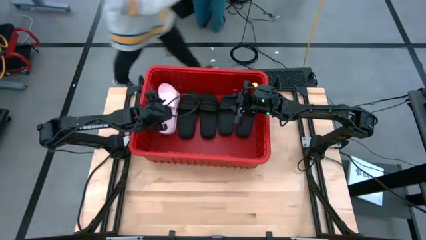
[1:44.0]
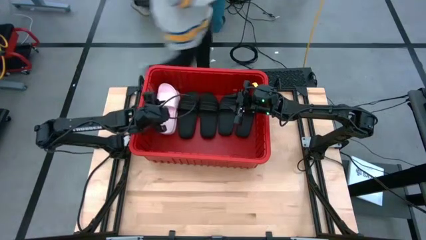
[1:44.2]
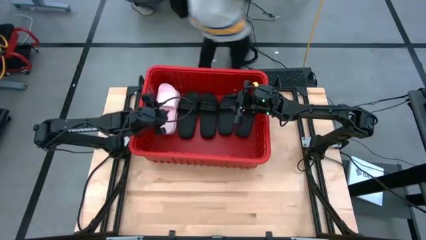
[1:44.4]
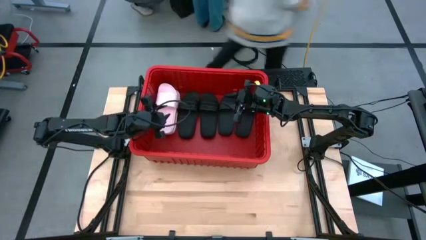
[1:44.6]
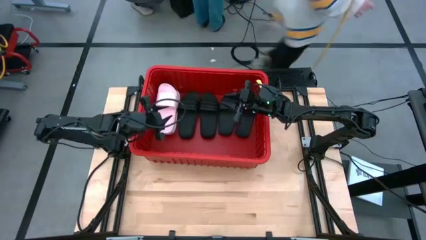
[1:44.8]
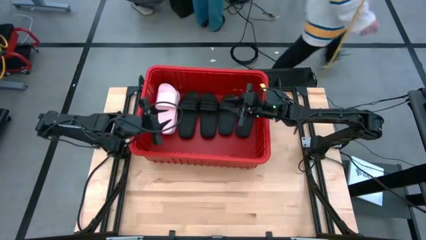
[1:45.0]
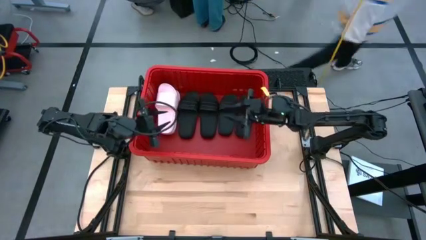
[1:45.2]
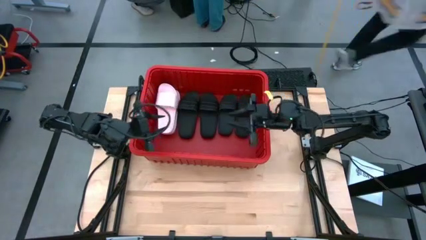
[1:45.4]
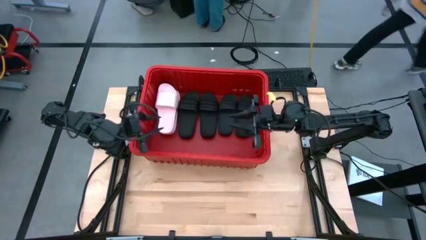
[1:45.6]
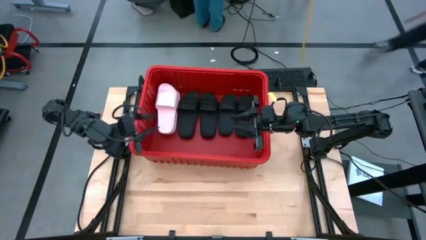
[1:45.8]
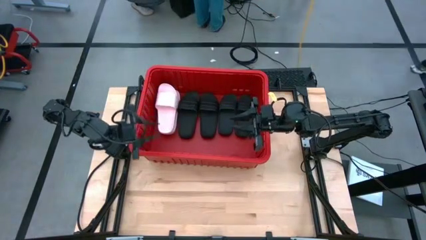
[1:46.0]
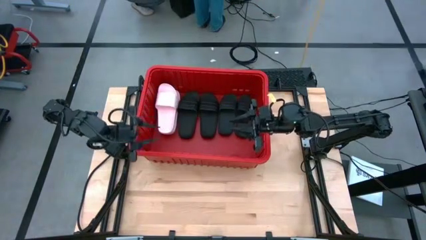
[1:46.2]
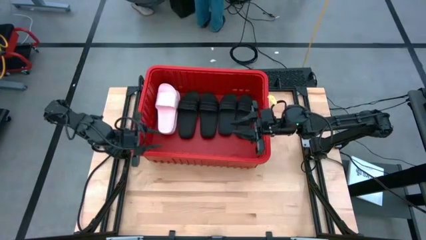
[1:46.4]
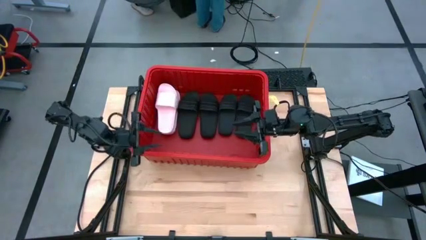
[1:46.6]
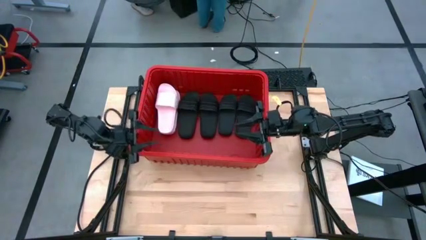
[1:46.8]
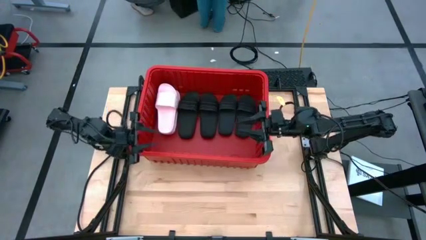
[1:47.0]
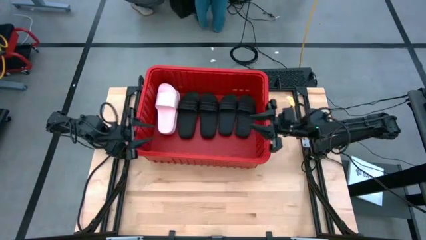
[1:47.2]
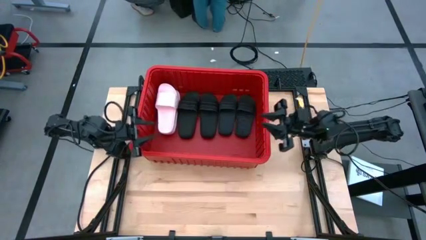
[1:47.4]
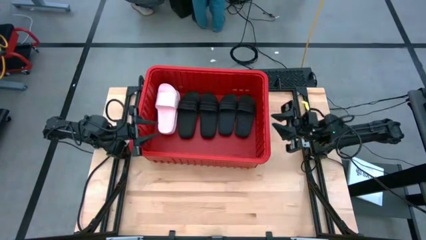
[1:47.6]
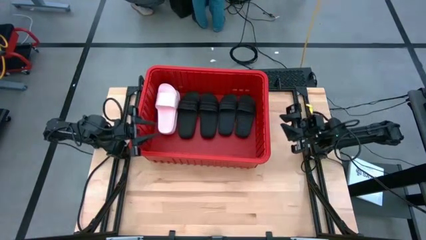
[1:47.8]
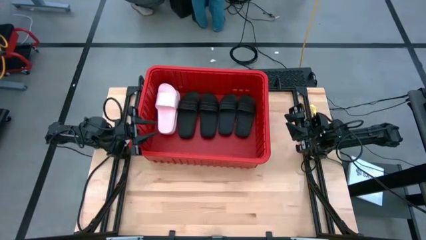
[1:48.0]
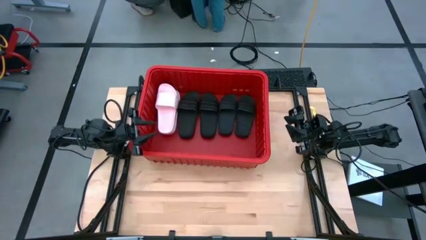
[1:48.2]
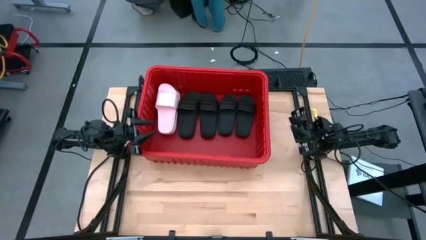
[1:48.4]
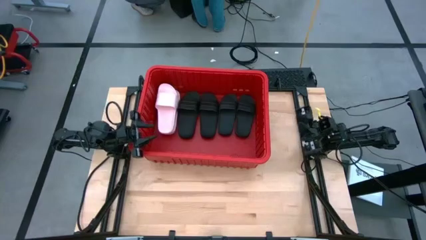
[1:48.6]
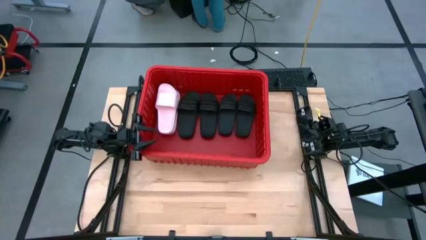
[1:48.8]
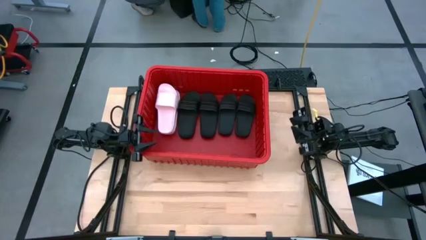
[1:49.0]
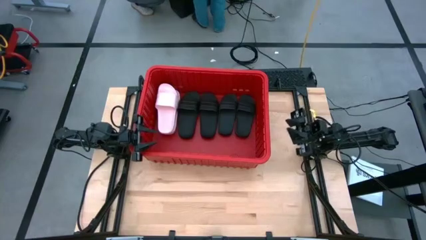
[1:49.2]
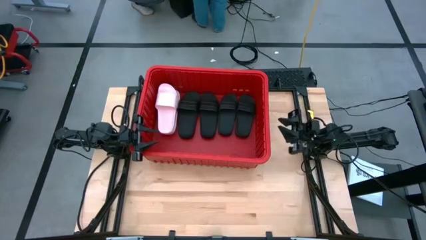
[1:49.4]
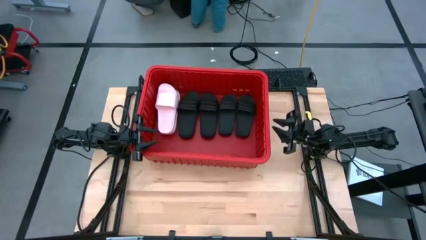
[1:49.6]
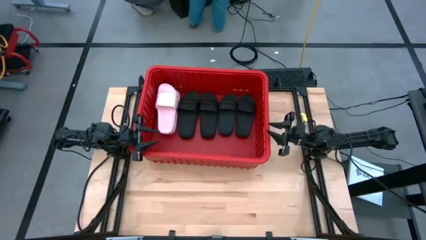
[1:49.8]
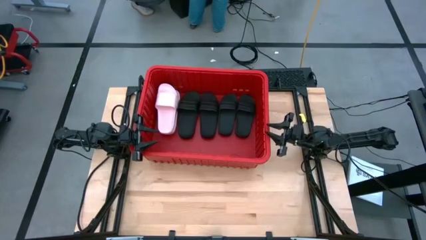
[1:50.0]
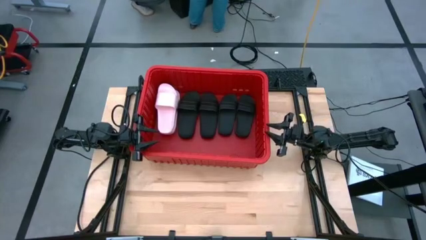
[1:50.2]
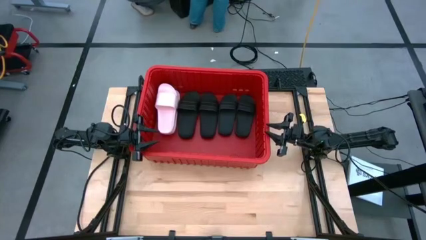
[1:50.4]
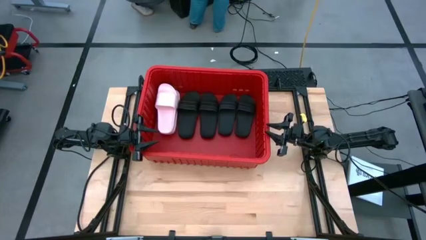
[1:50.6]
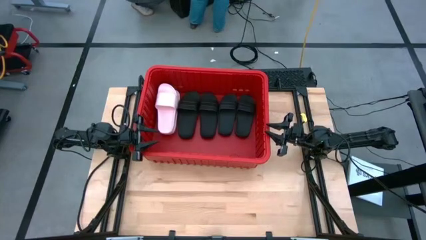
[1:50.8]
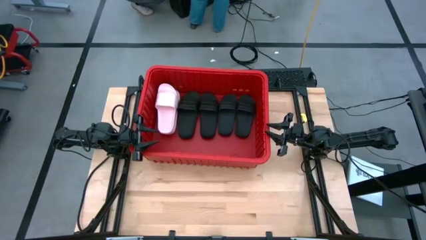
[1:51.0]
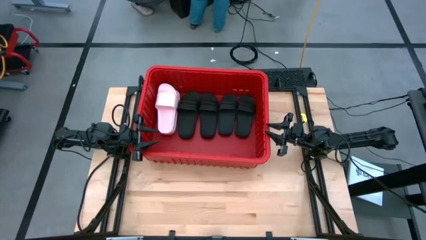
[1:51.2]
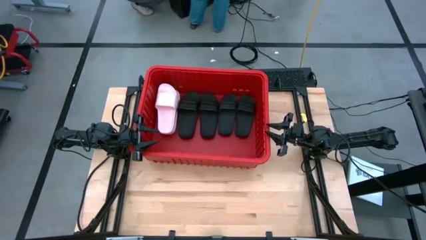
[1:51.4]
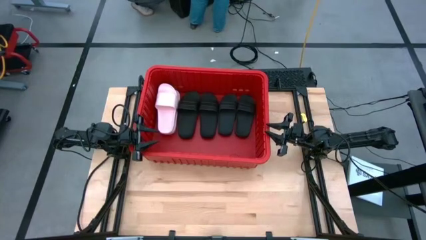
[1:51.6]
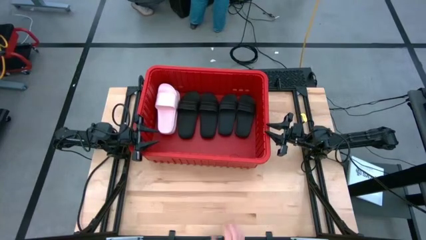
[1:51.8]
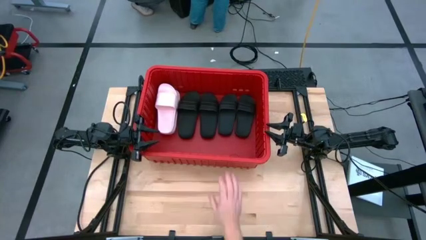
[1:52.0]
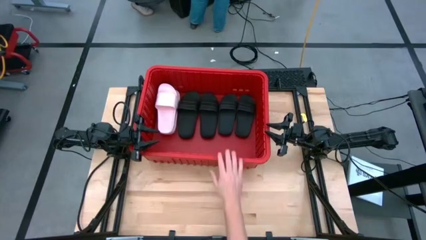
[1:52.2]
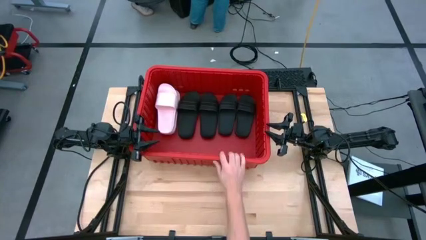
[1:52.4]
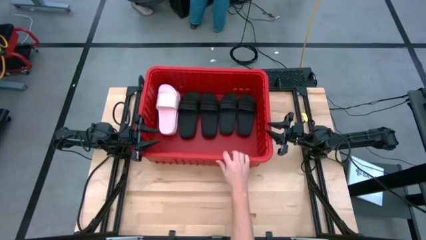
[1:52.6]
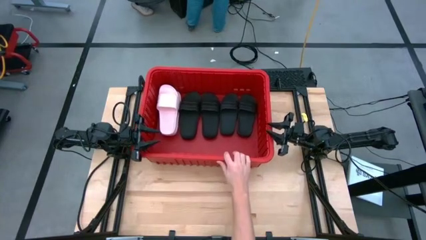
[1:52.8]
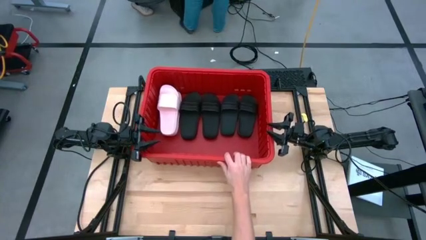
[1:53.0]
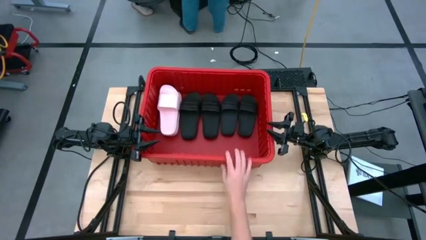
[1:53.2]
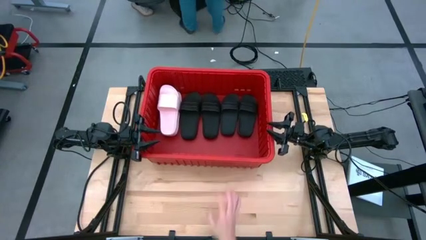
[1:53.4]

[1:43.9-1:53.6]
Task: Pick and place slides into bin
Return to Home Position

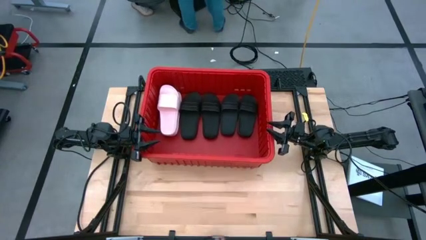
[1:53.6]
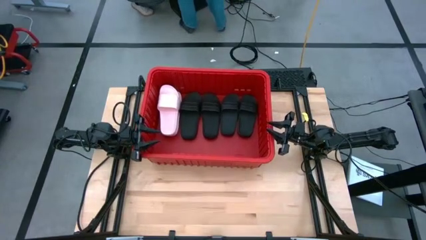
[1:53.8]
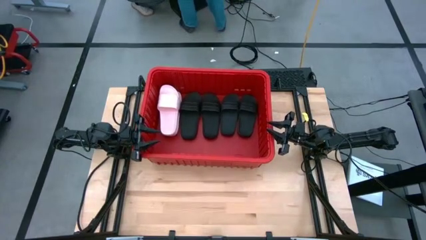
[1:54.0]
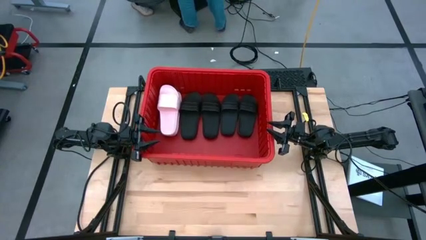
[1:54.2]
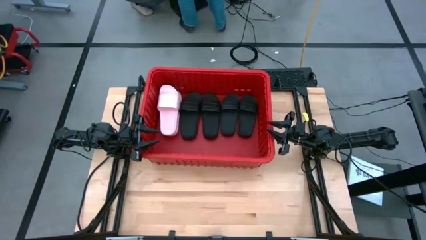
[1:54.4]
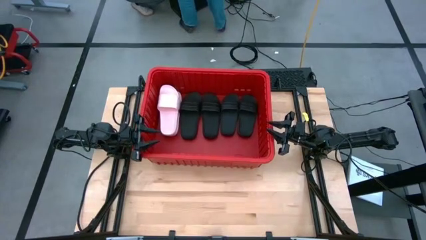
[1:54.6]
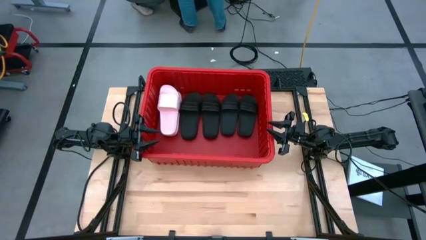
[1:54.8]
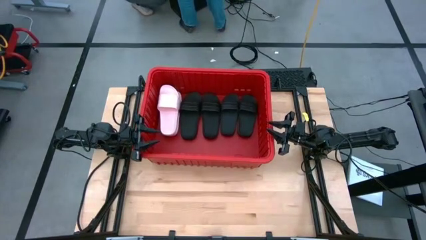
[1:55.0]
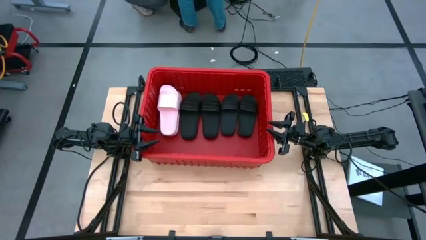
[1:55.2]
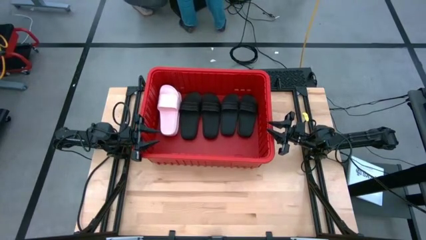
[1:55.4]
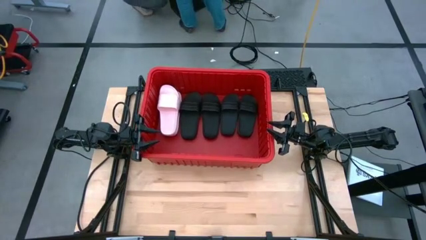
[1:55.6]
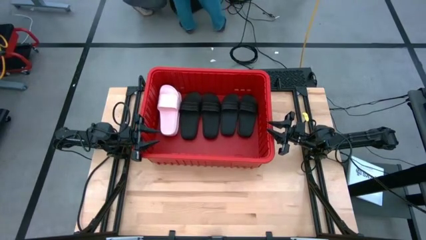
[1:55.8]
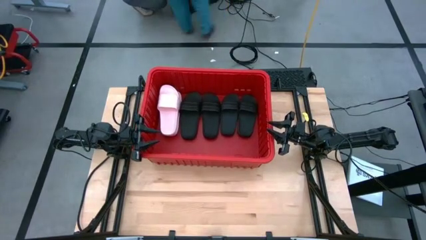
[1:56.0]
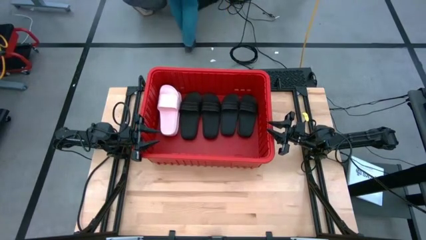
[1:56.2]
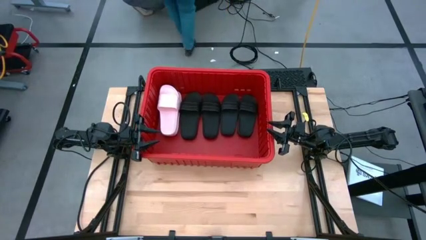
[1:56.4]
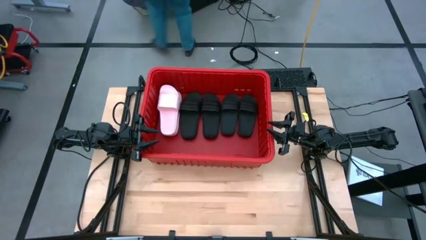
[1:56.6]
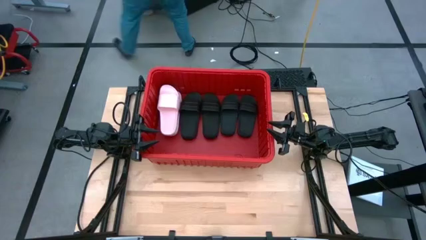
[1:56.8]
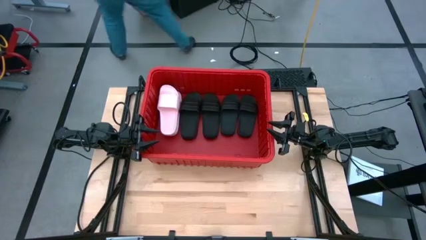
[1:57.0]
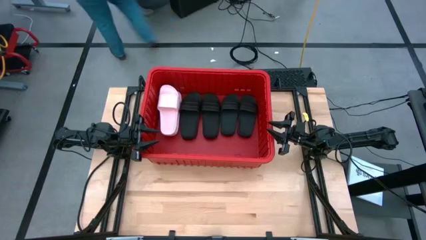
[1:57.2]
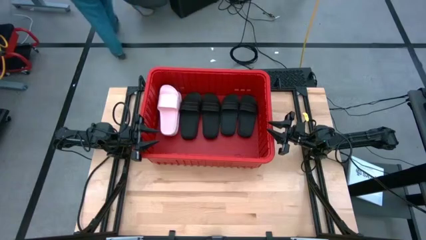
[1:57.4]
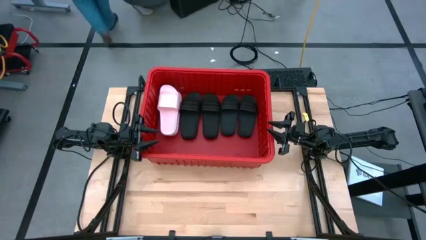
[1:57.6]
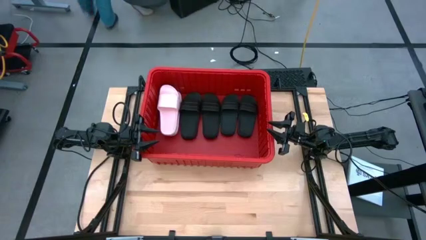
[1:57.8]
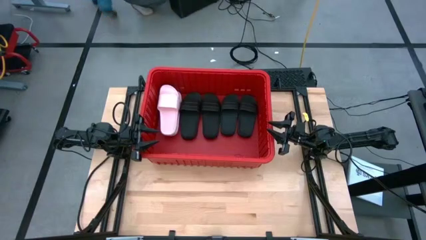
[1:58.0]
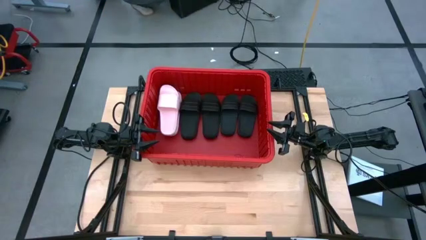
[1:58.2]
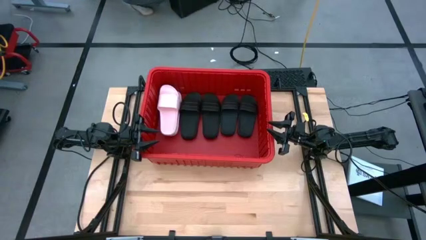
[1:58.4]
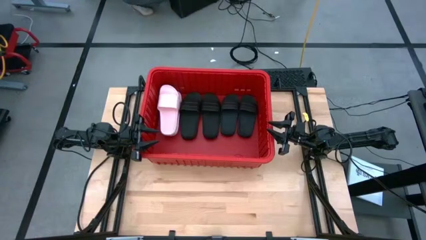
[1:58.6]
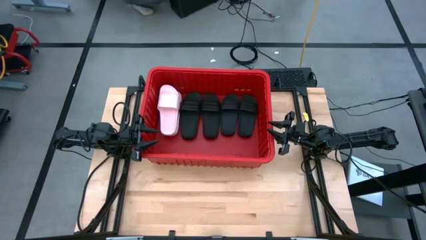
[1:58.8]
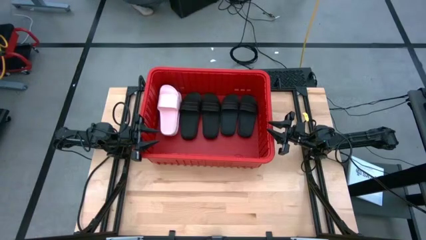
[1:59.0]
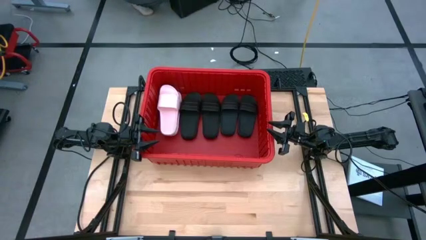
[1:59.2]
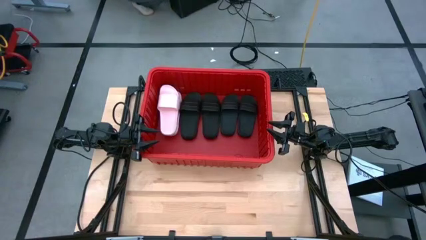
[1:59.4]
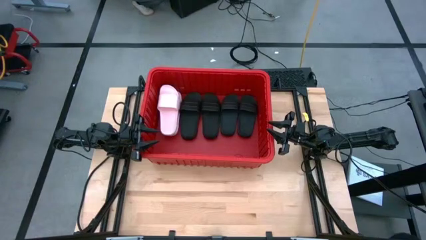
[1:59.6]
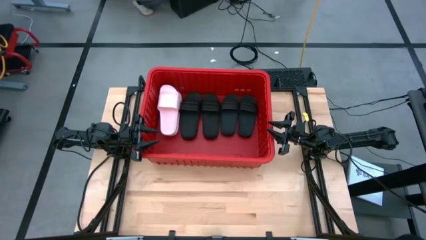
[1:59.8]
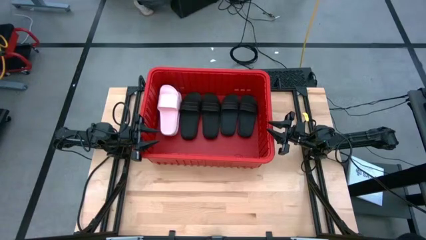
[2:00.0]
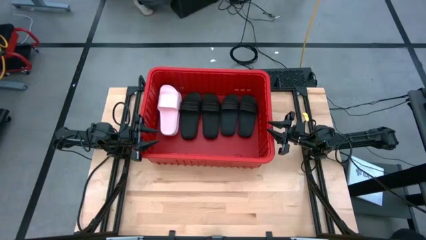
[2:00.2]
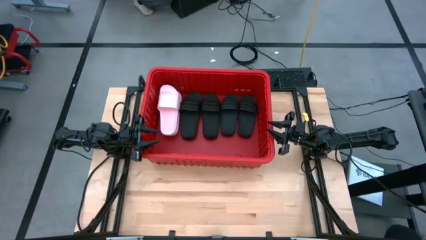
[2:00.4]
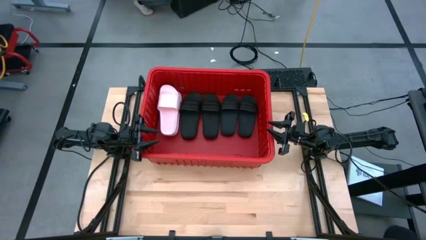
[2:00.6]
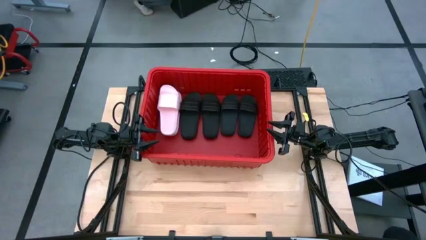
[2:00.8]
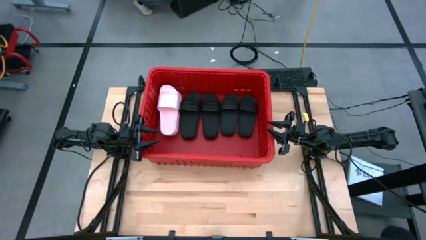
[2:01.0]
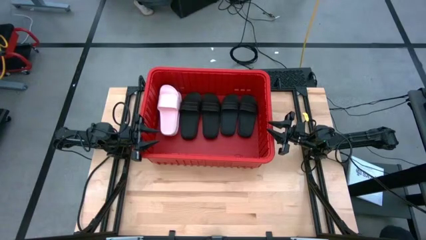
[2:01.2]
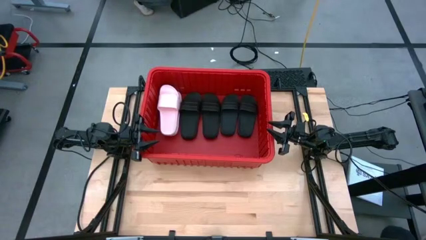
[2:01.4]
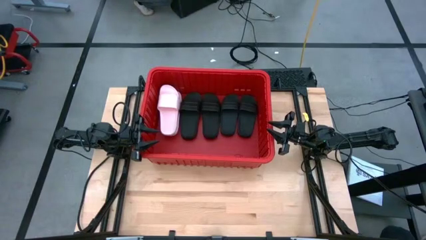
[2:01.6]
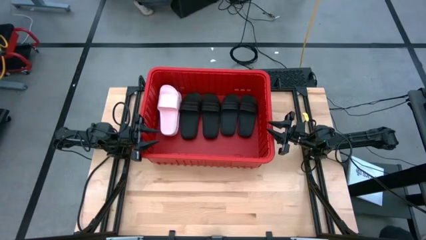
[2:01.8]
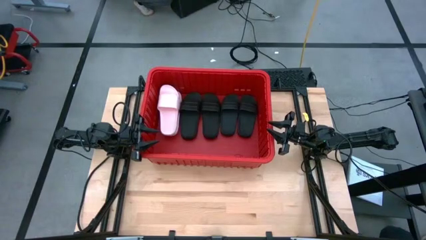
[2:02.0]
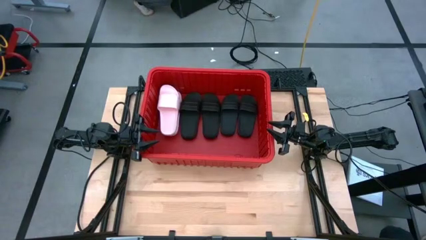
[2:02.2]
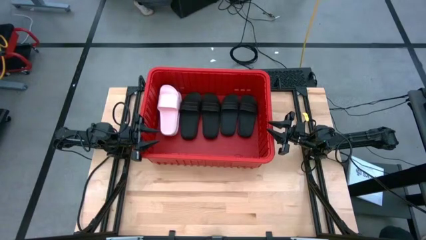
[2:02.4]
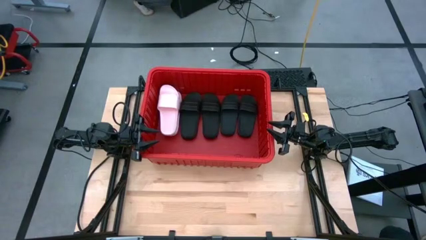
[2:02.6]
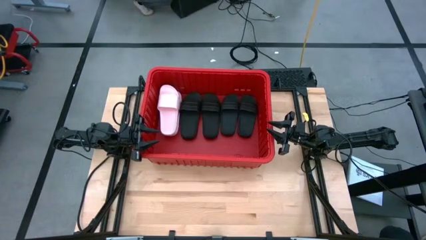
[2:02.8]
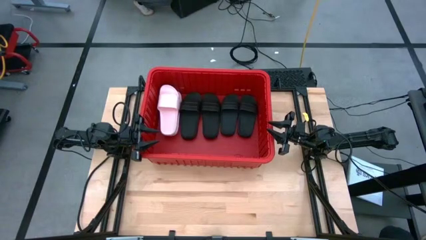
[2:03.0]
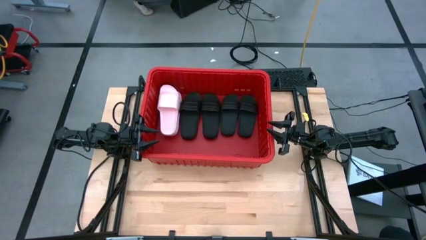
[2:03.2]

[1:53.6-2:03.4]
Return to Home Position
